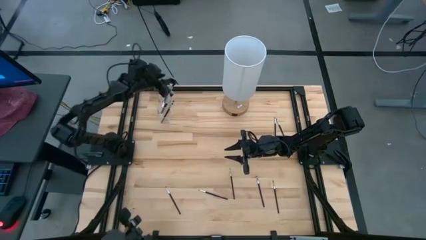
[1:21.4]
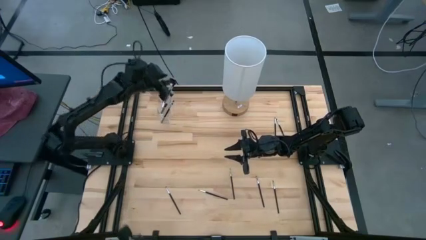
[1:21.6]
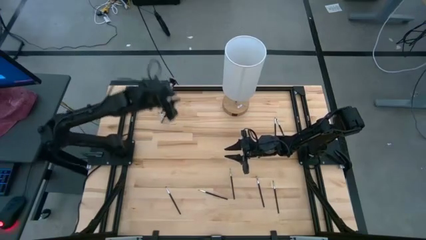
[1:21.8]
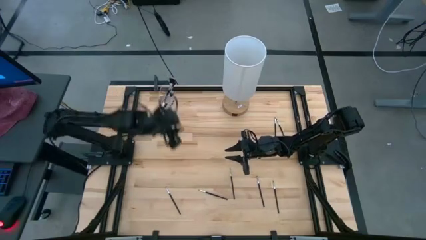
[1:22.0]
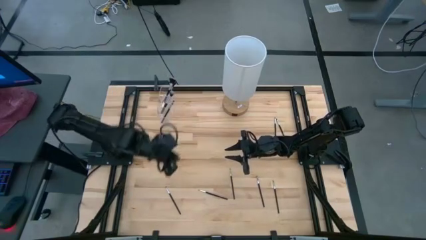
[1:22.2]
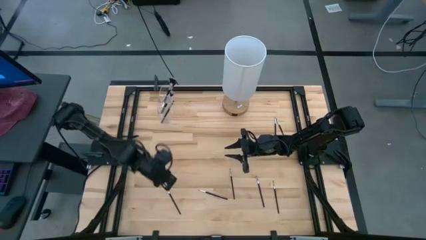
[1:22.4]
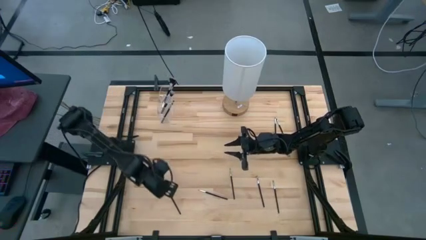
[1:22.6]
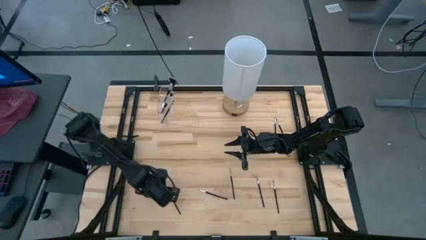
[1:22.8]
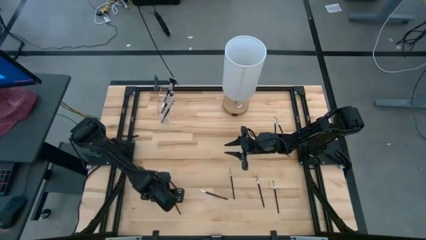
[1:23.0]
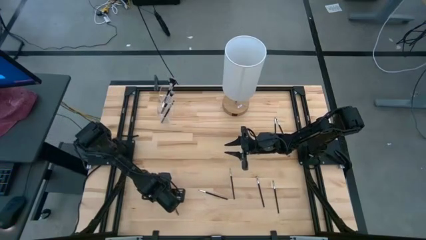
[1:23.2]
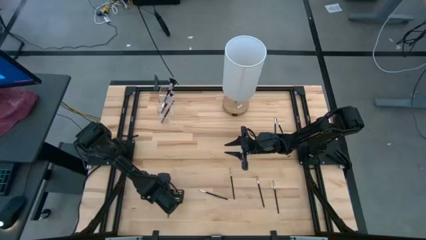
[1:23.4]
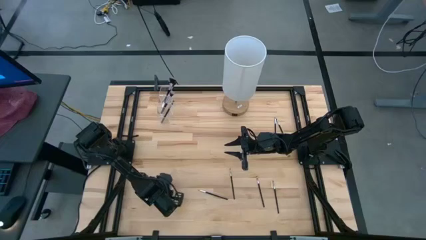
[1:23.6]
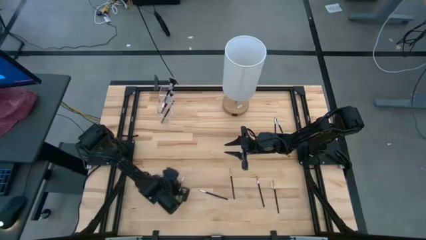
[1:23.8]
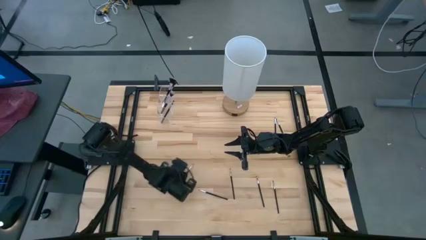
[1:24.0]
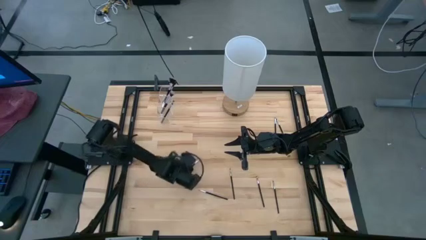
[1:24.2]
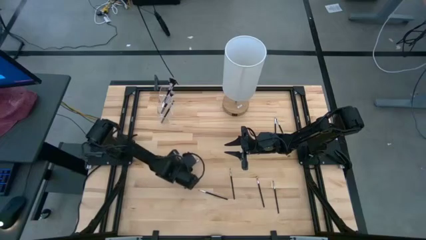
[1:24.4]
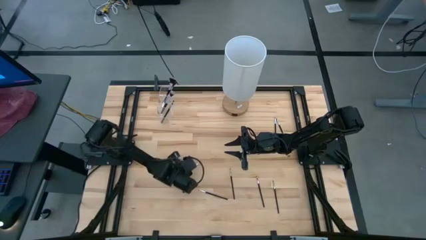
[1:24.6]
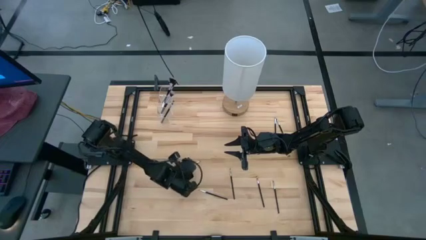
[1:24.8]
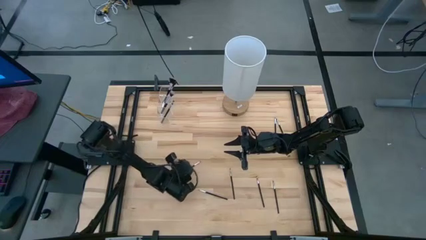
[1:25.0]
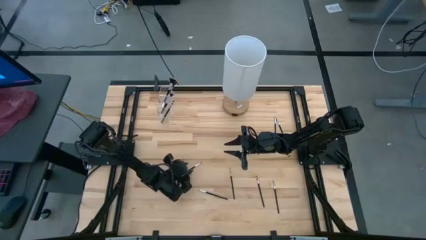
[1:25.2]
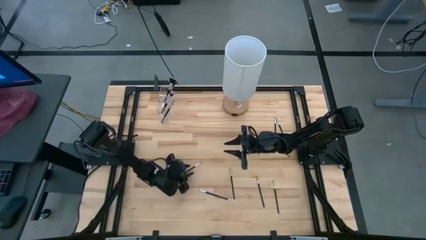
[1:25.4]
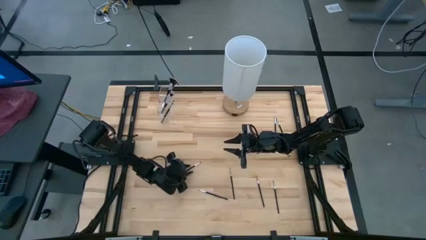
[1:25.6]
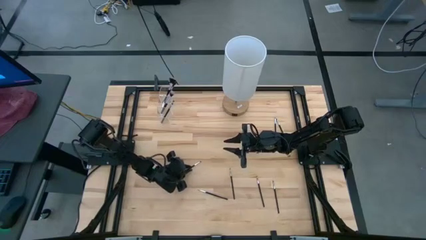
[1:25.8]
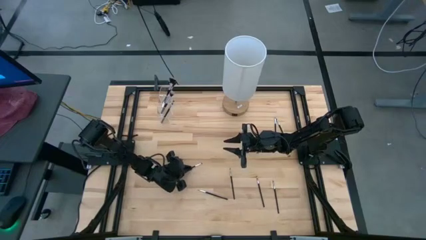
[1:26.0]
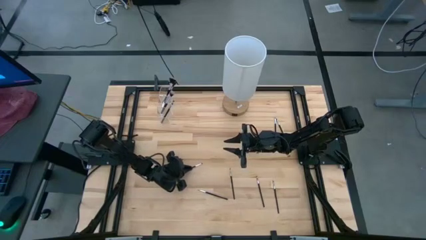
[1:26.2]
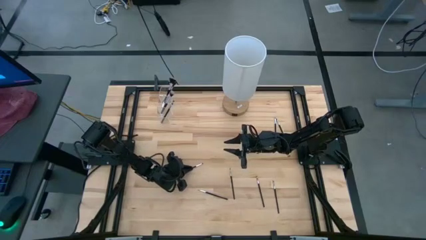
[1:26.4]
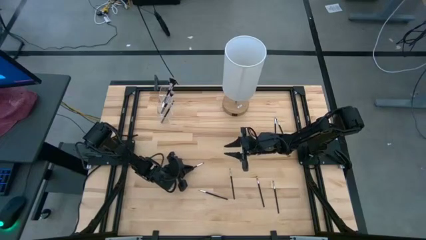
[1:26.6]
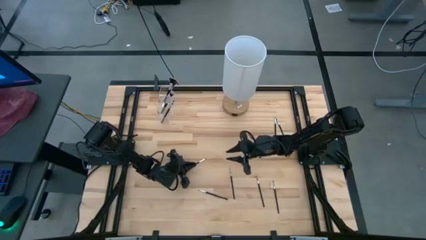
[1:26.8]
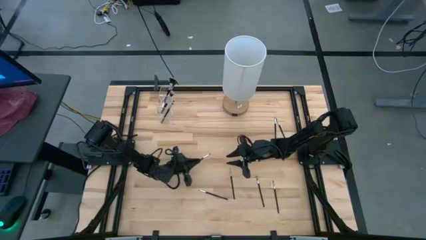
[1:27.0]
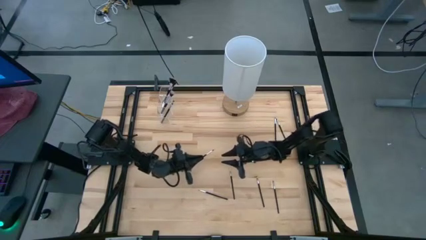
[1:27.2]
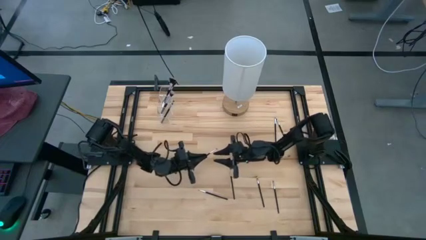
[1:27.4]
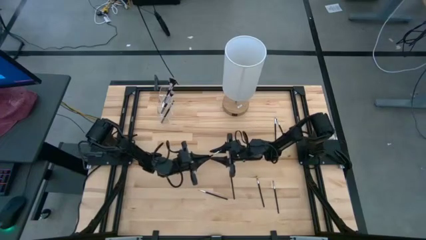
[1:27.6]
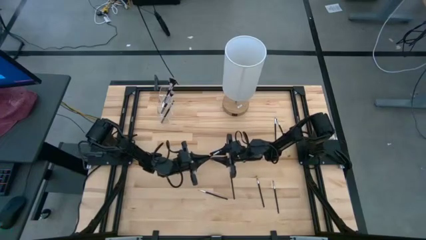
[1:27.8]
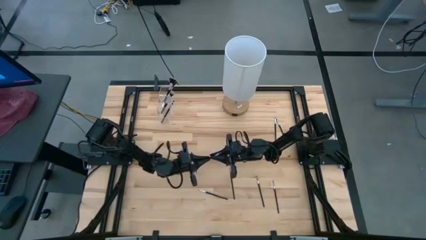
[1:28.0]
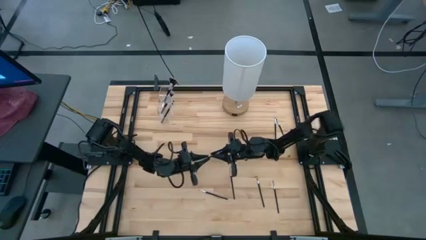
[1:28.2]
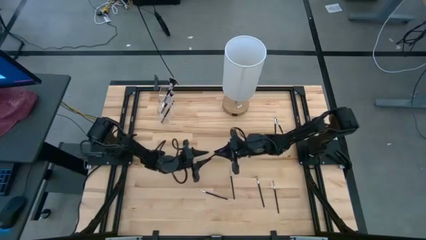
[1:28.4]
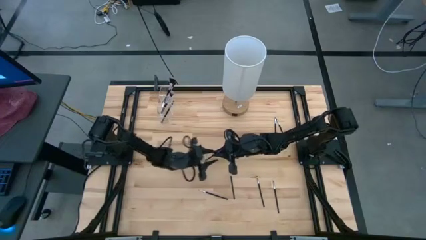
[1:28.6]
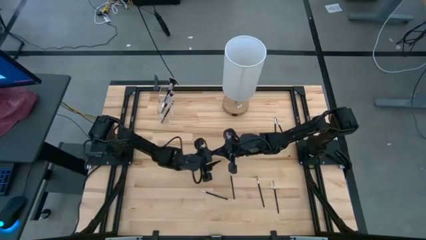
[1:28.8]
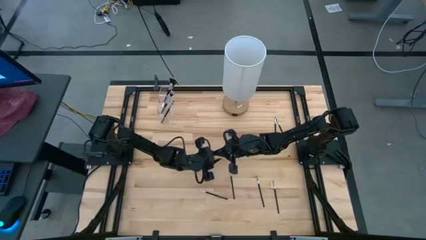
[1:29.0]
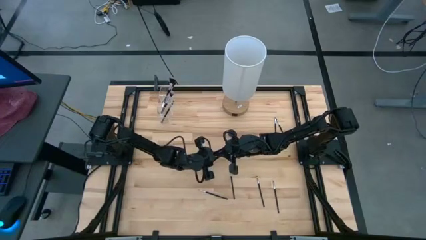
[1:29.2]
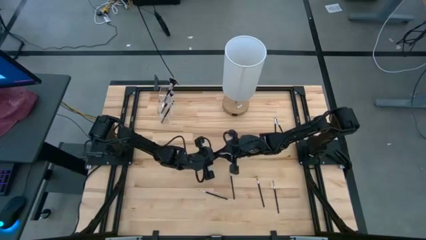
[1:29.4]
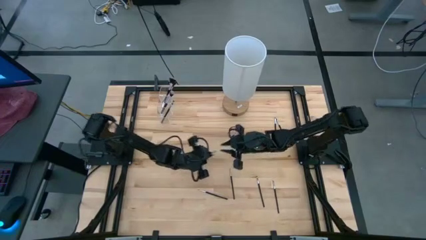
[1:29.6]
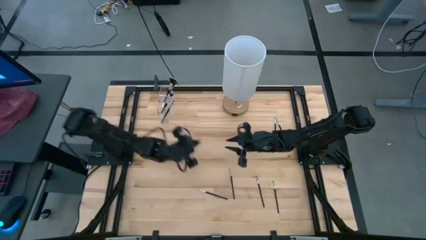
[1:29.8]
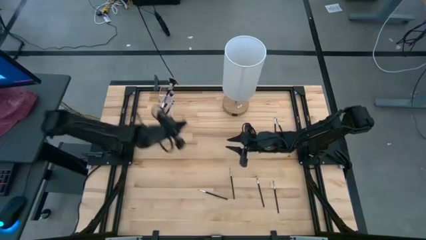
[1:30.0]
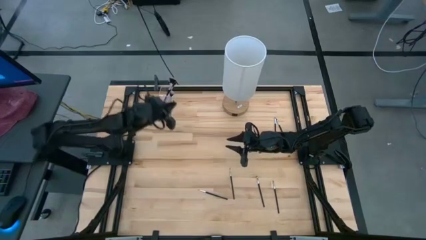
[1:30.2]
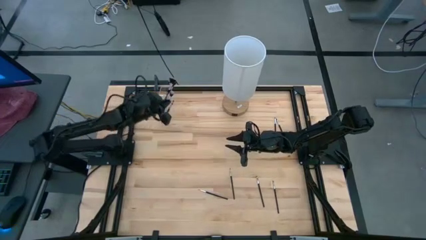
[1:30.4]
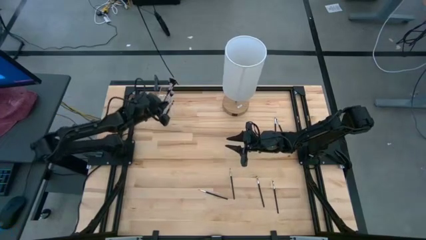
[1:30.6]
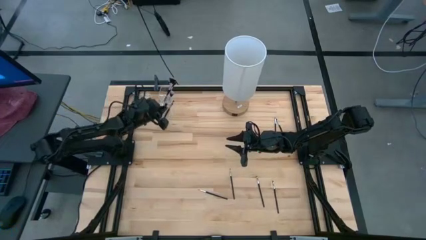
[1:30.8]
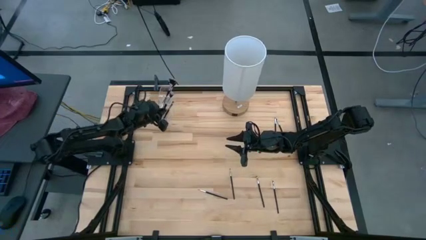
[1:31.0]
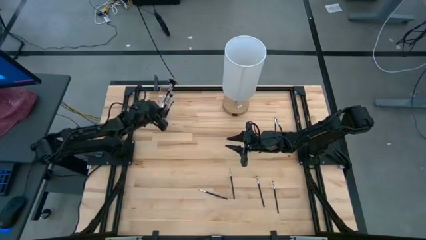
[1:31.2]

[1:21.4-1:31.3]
Task: Put items in baskets/containers
Put the black eyeshadow brush into the transparent organizer

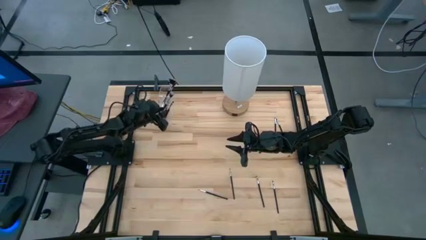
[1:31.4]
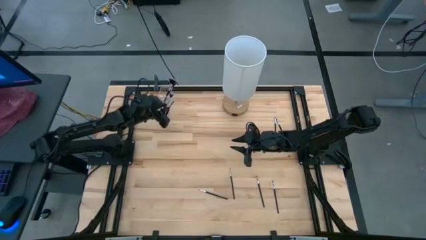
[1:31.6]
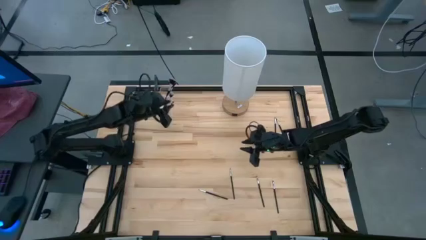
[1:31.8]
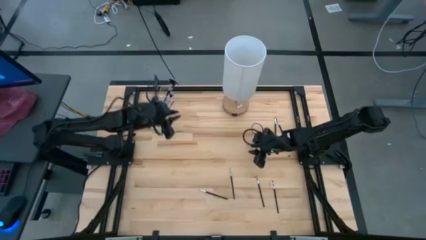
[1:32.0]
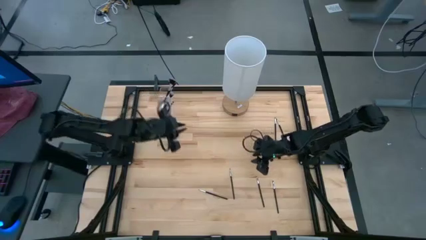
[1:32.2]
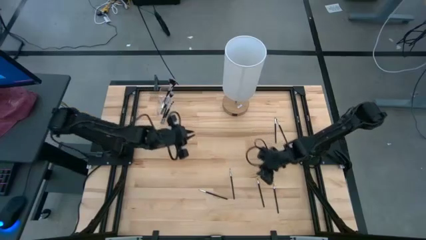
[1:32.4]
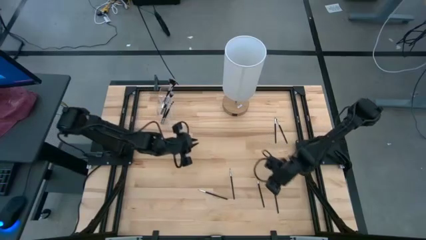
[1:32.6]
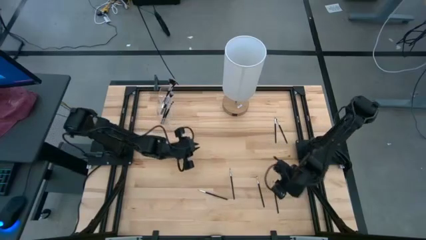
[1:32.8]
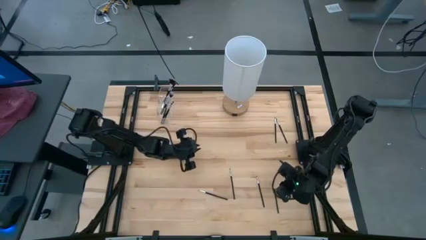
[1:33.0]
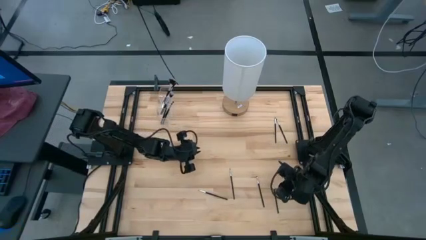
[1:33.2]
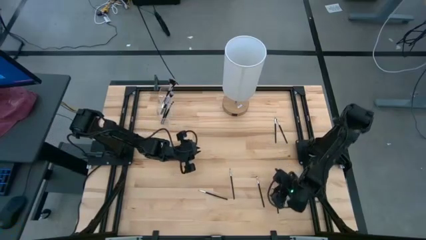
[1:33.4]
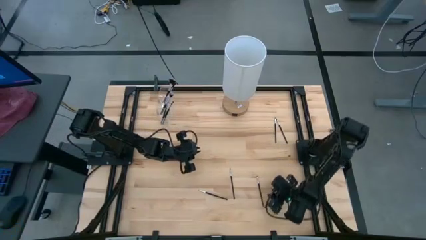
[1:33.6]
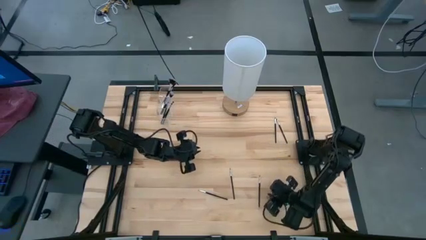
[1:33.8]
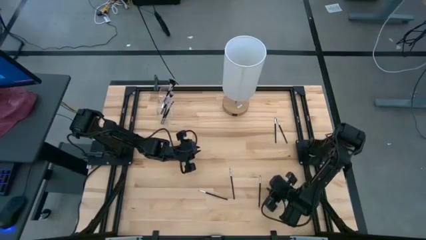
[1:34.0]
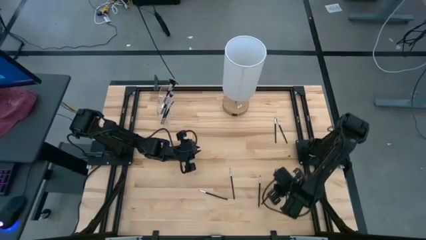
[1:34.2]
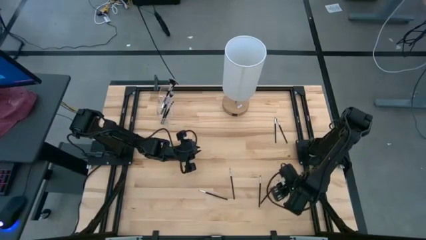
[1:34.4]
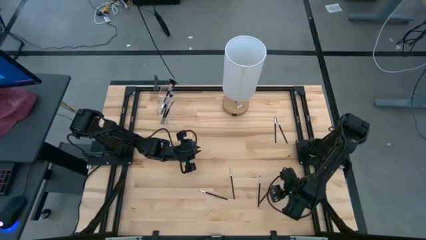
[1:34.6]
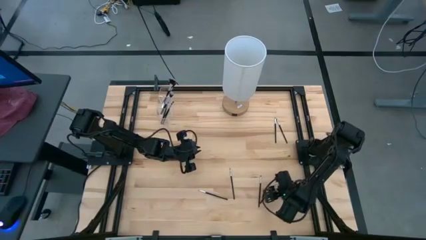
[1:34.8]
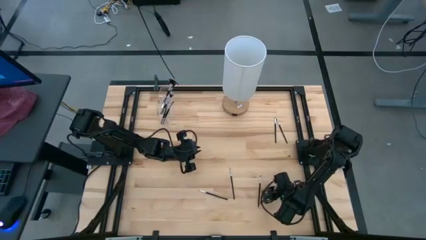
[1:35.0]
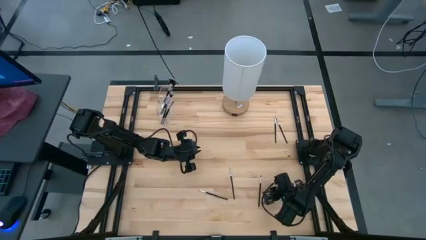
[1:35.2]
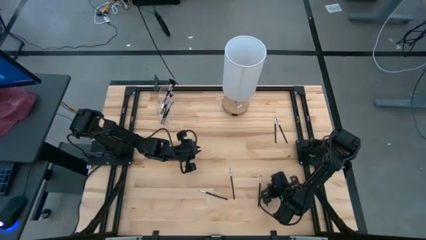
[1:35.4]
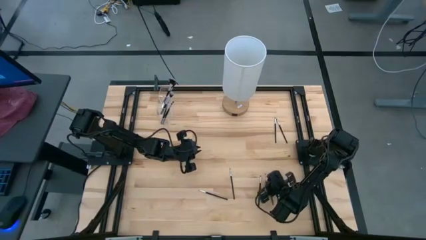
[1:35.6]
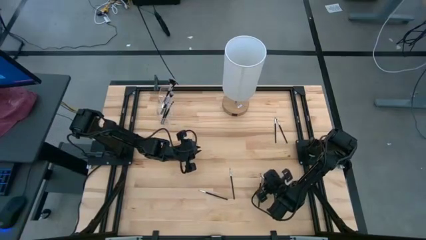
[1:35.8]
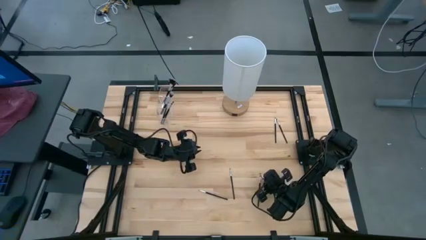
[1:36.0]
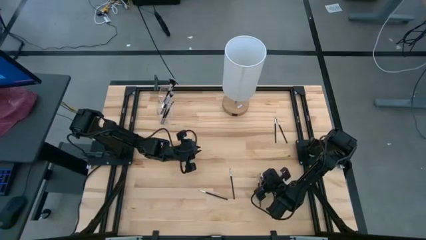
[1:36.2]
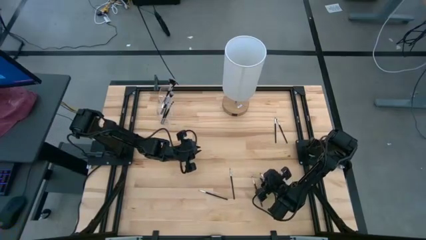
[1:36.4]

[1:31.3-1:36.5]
Put the black eyeshadow brush into the transparent organizer

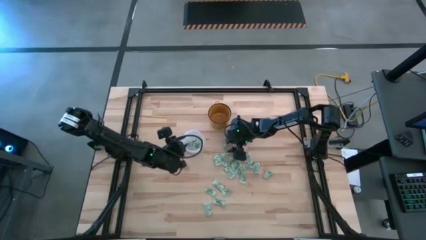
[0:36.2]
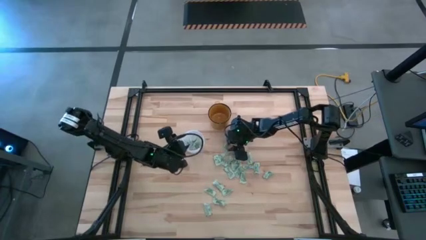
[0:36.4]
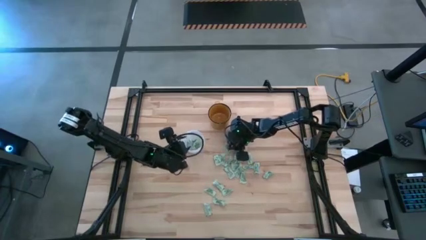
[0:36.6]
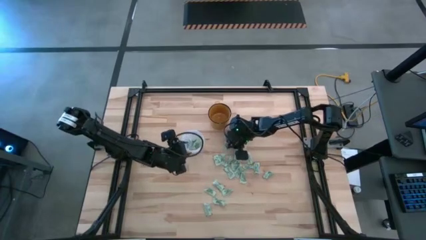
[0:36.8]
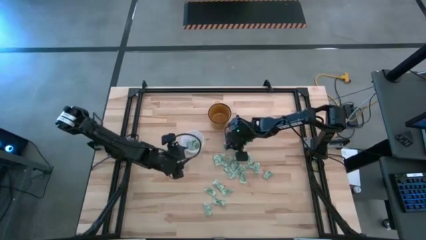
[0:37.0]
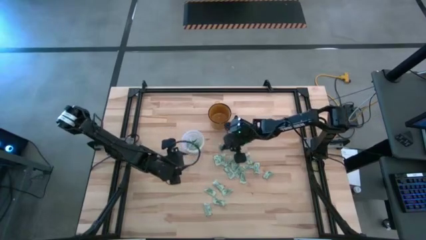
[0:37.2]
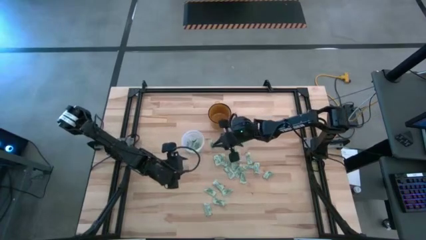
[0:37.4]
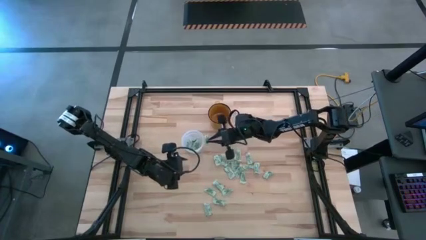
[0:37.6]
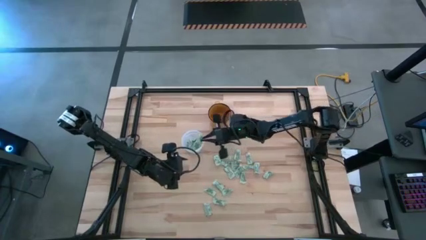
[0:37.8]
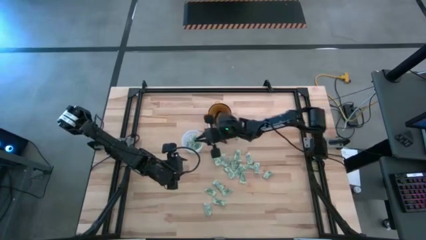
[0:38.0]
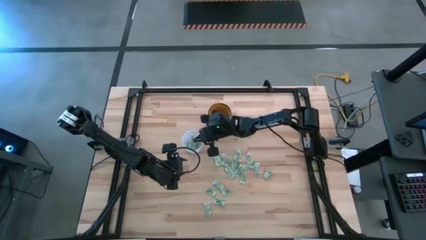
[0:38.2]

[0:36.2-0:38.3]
Task: Pick and place Stevia / Truvia into bins
Put the stevia packet into the transparent bin
